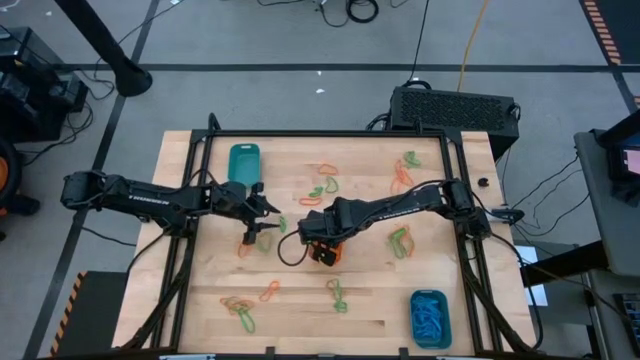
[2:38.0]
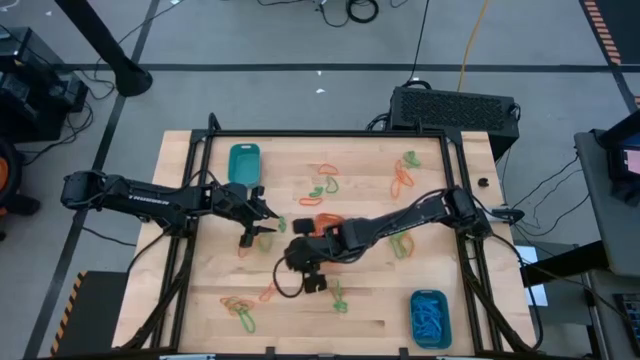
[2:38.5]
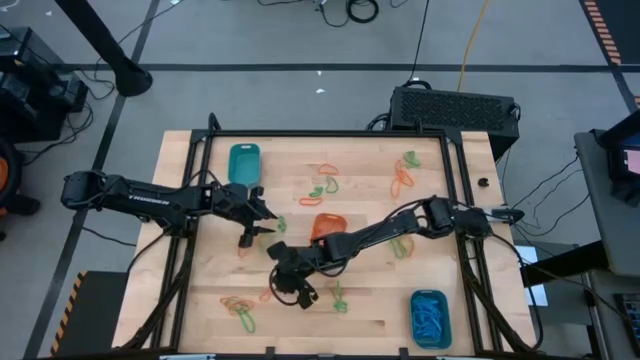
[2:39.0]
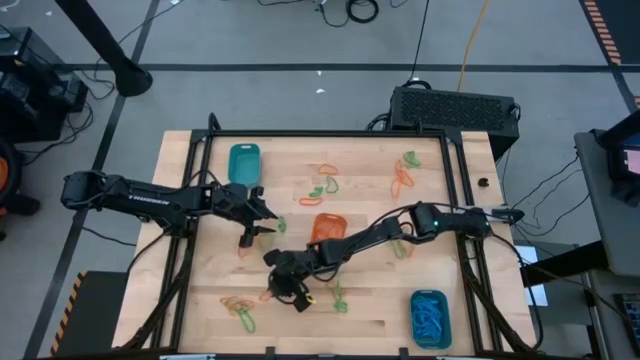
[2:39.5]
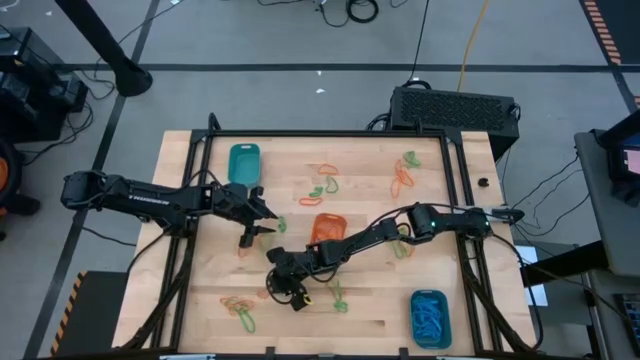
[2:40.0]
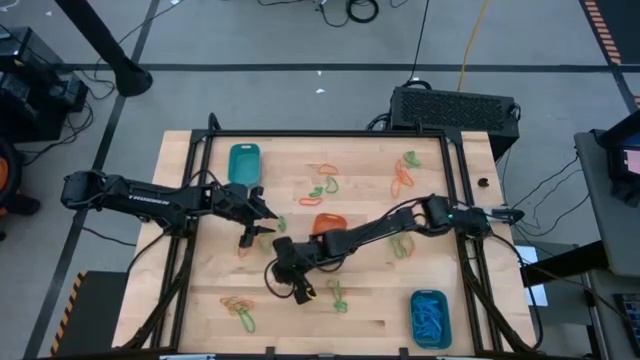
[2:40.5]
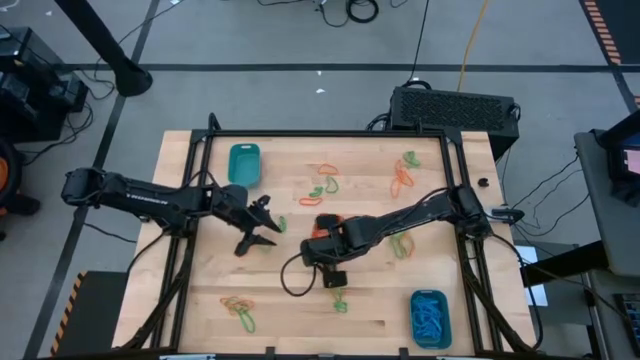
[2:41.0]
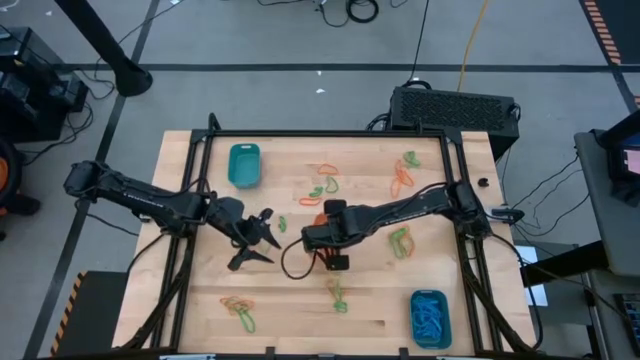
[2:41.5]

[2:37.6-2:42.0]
Task: Sort rubber bands into baskets
Put the orange rubber band into the orange bin

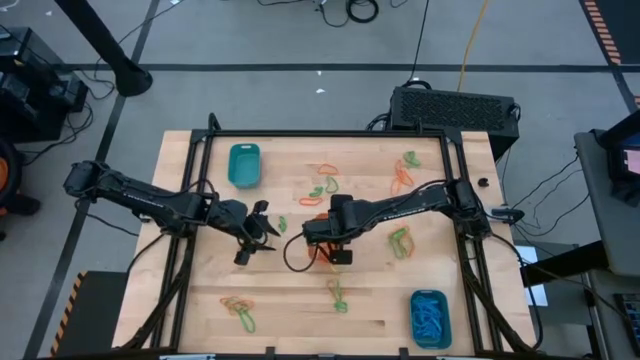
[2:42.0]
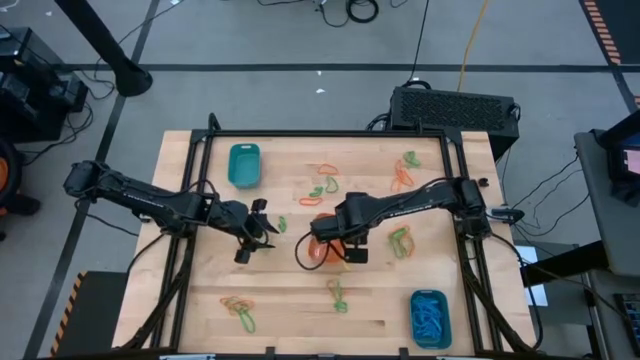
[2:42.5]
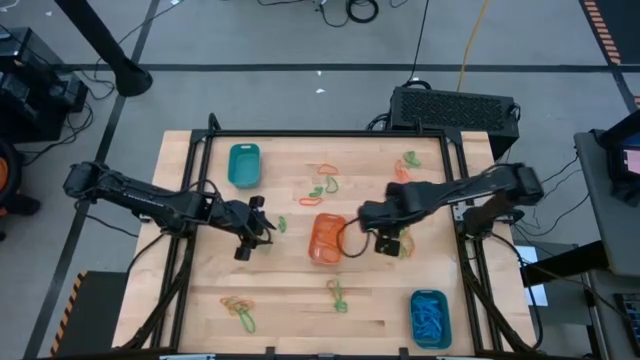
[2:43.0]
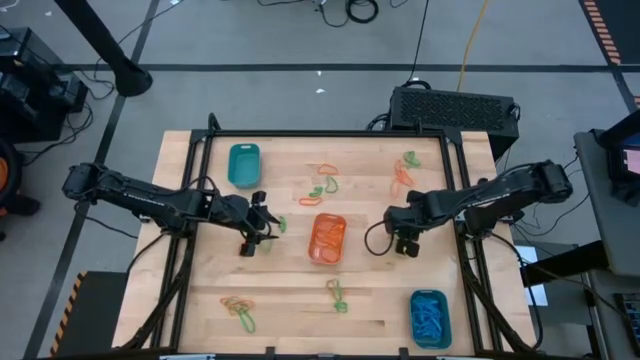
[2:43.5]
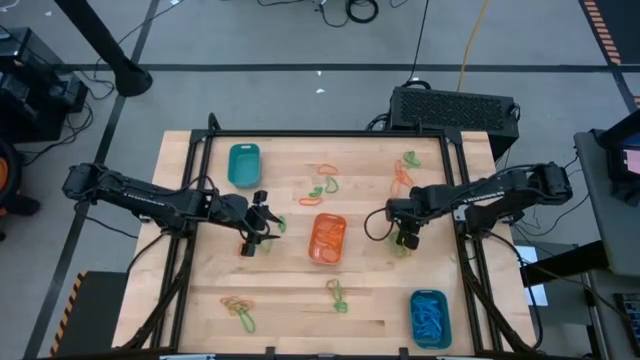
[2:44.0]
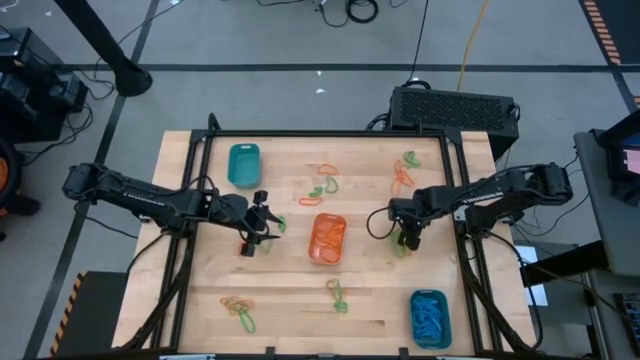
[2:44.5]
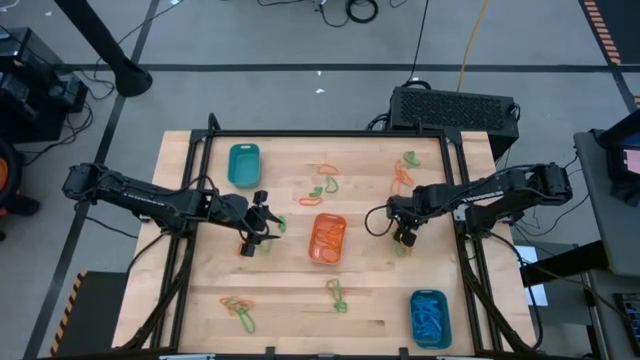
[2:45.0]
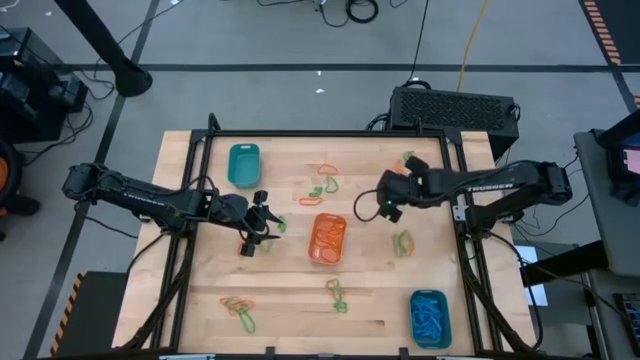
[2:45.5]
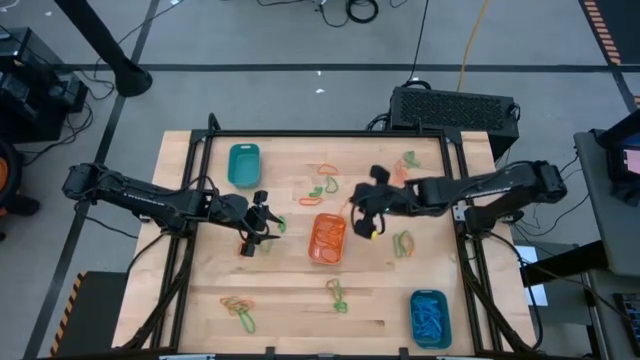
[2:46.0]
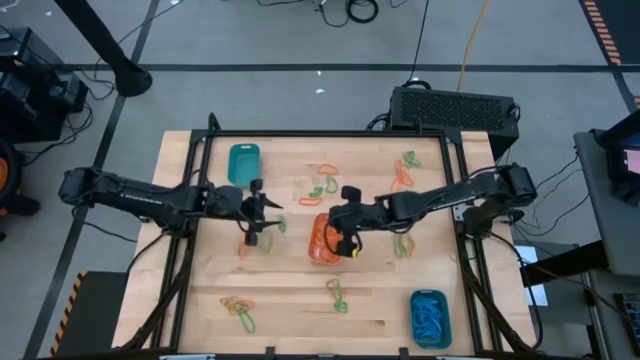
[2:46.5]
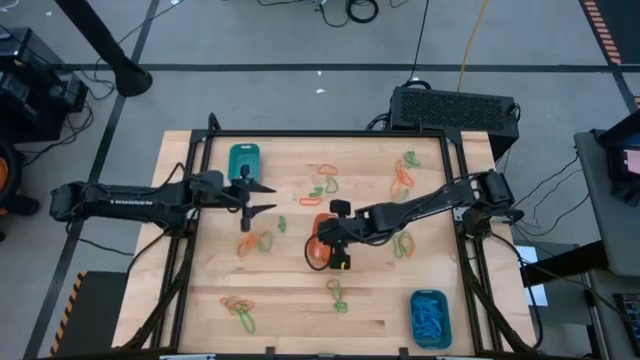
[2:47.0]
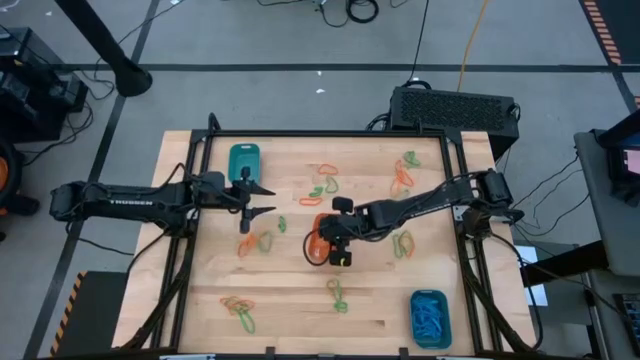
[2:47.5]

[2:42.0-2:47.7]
Put the orange rubber band into the orange bin

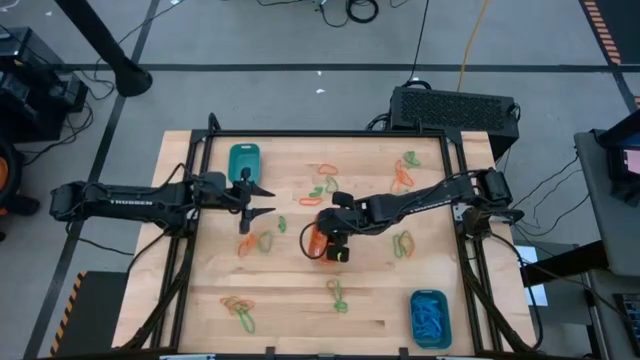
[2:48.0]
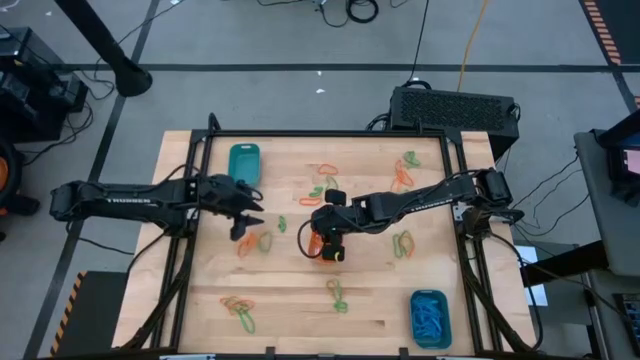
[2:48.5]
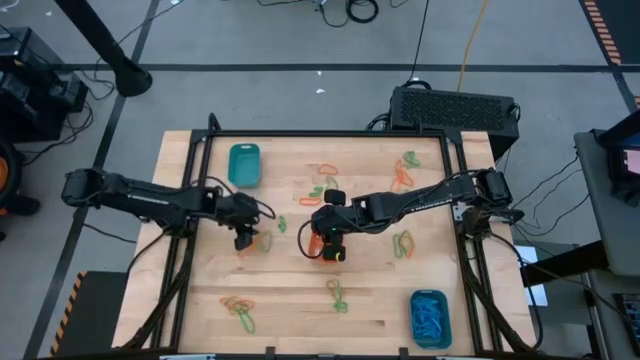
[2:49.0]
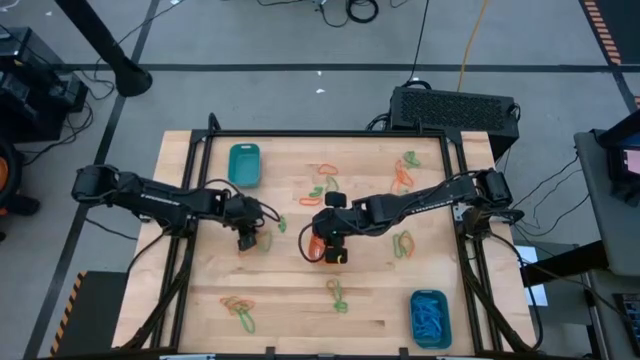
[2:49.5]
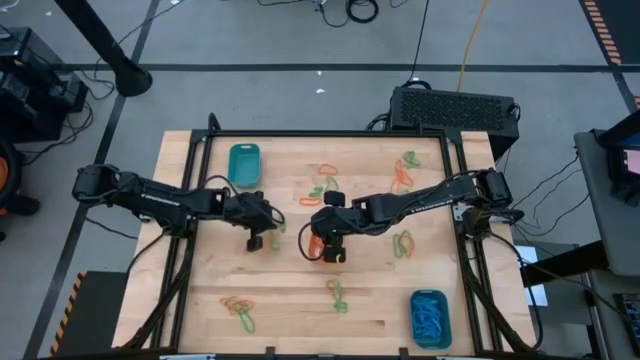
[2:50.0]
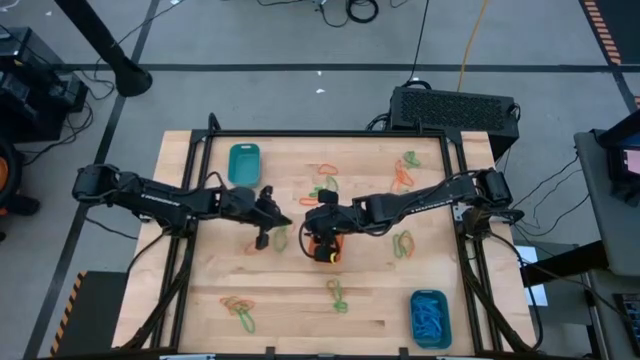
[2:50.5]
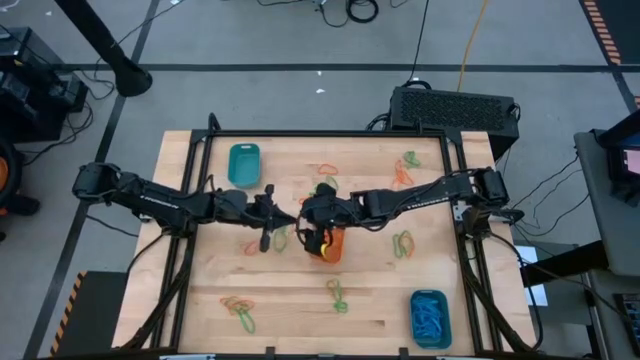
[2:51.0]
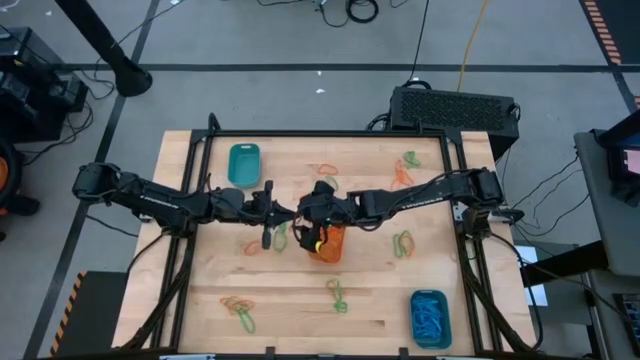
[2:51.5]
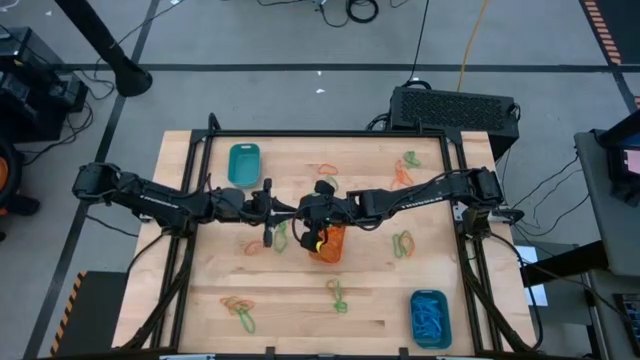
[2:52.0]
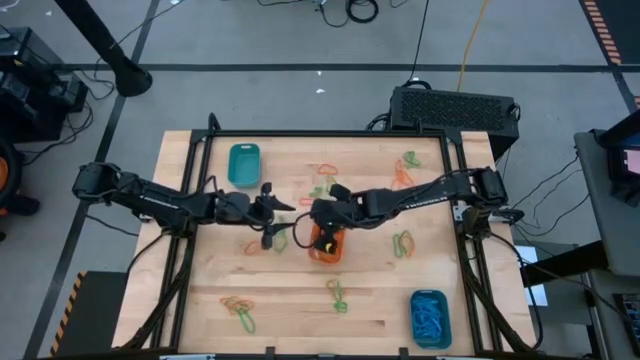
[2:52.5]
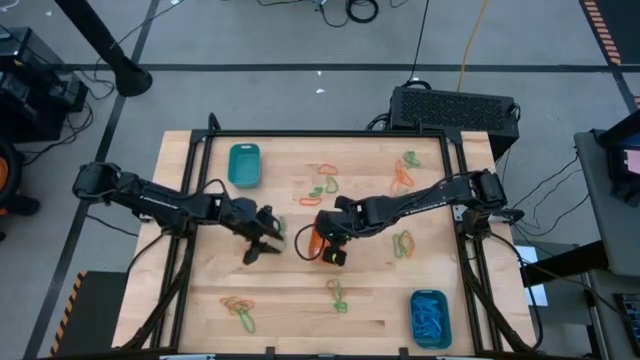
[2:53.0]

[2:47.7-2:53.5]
Put the orange rubber band into the orange bin

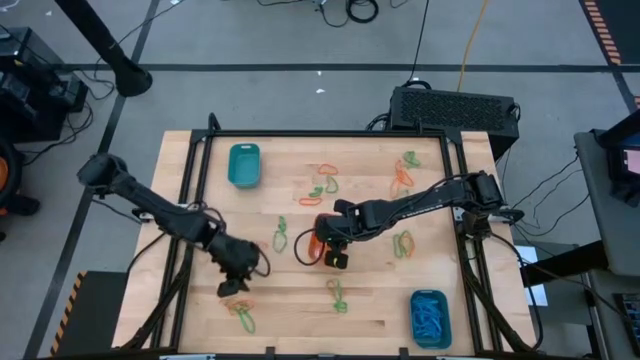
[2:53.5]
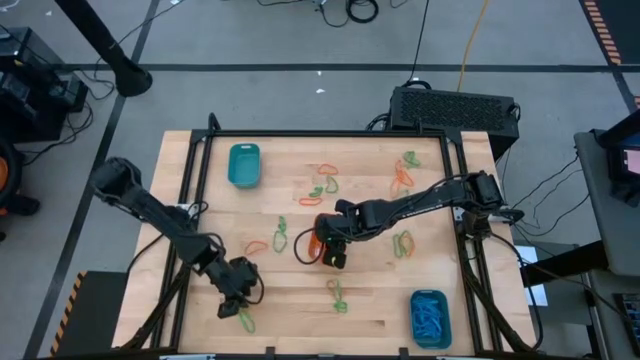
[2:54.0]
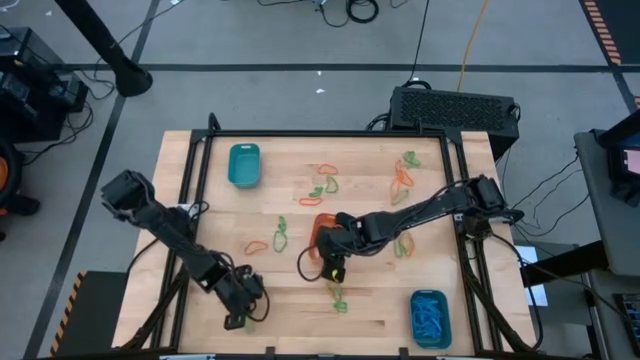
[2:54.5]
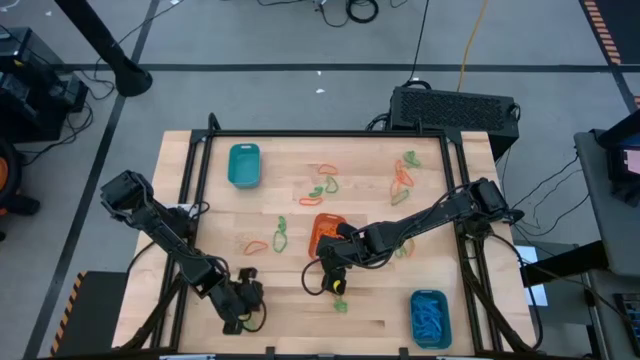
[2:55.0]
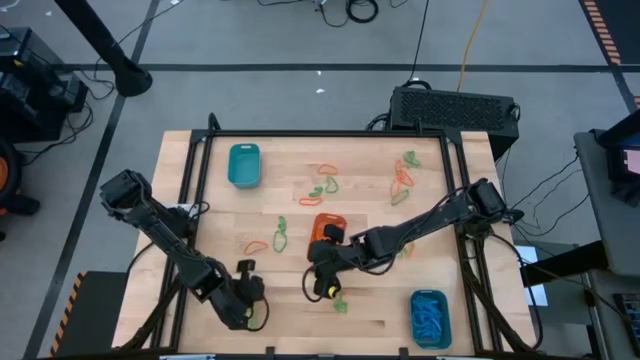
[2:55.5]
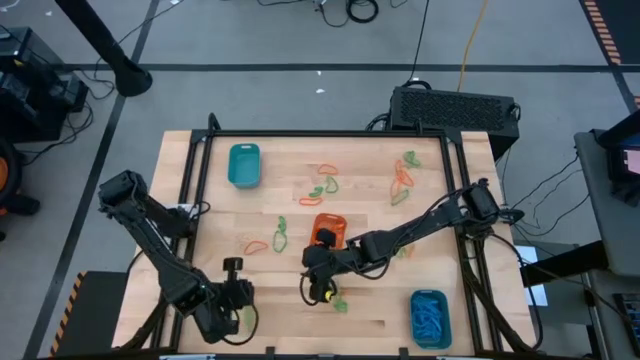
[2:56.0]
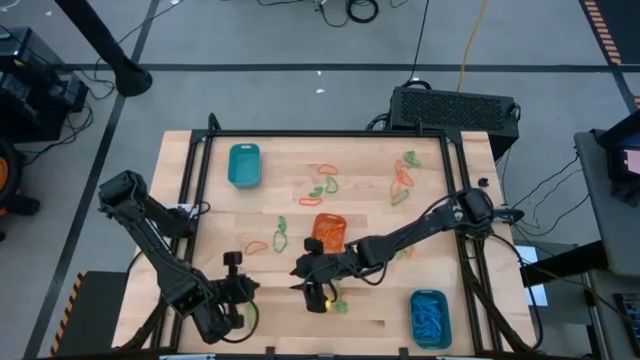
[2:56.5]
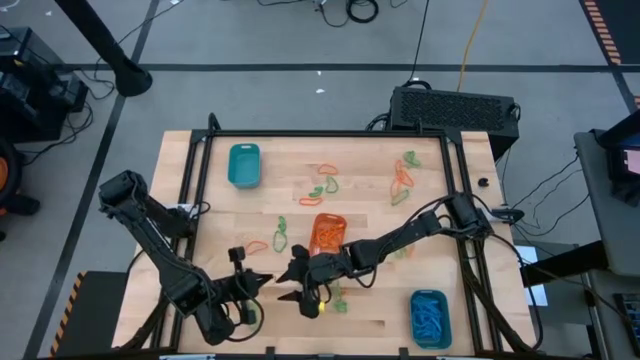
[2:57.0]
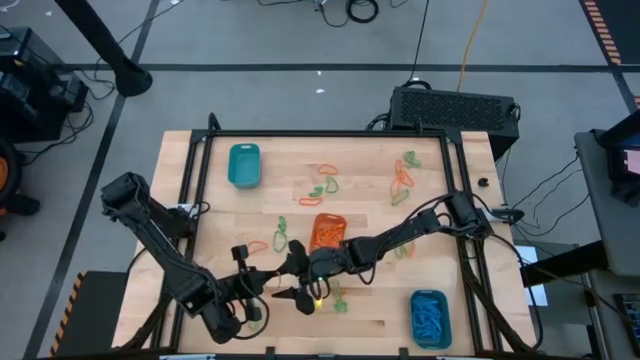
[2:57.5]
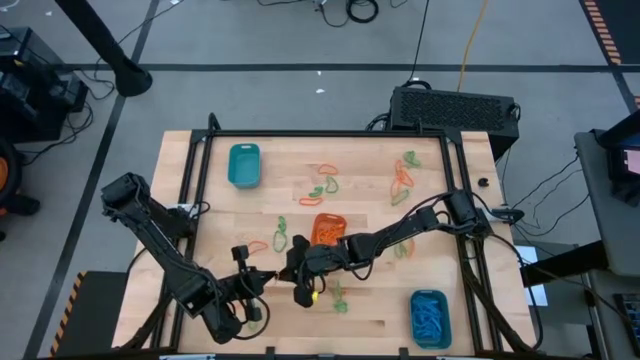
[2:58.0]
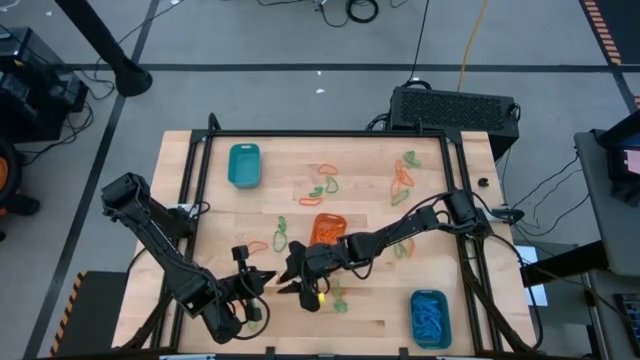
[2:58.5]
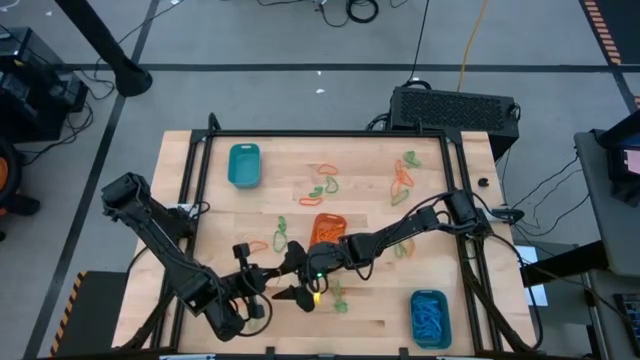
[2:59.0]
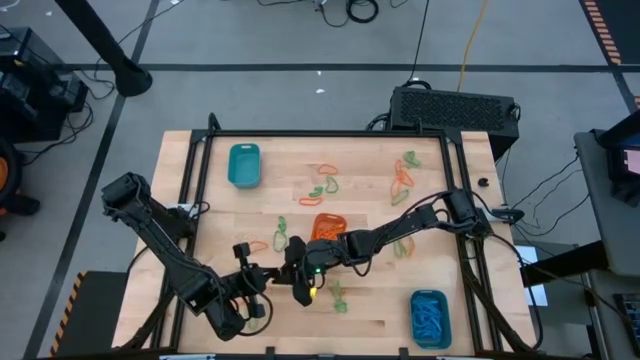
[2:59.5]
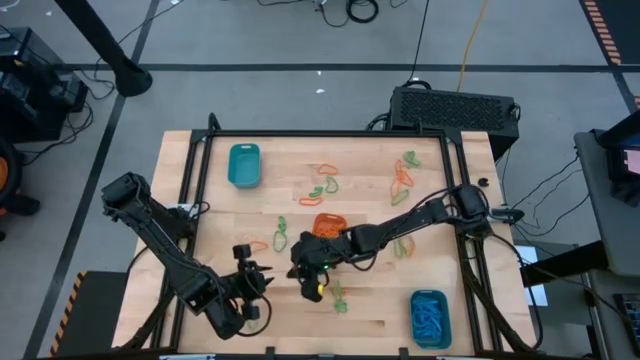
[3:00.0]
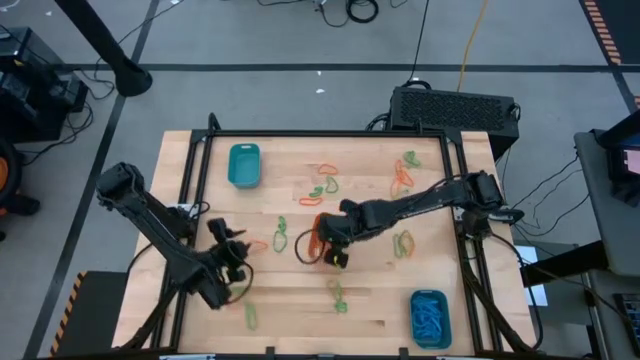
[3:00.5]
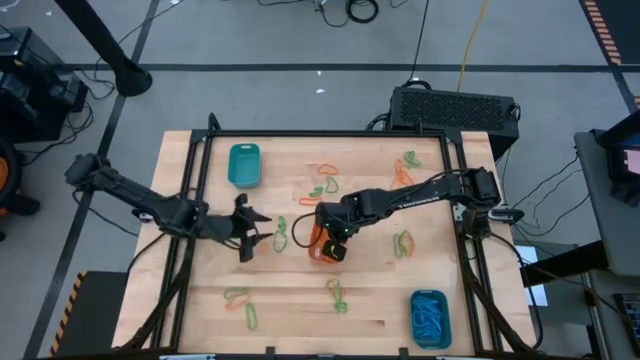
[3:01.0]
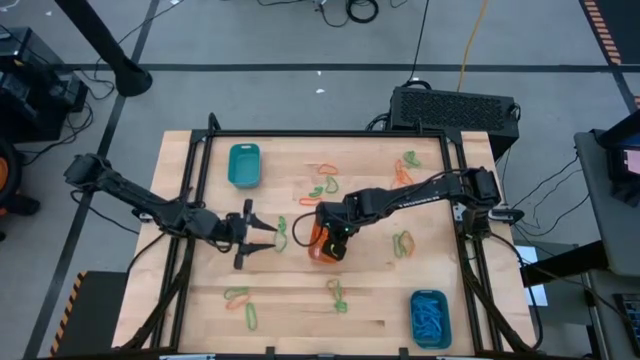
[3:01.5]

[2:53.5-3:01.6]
Put the orange rubber band into the orange bin
